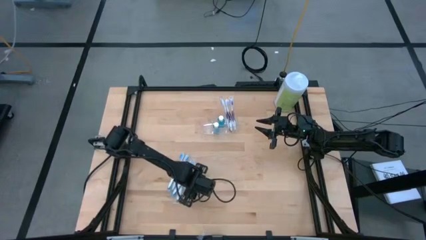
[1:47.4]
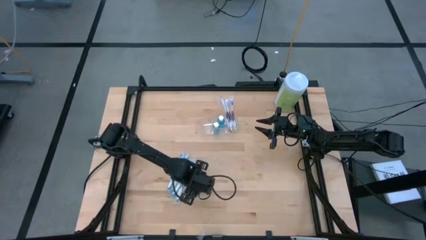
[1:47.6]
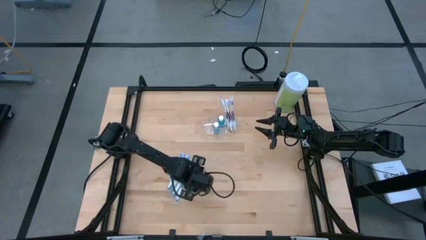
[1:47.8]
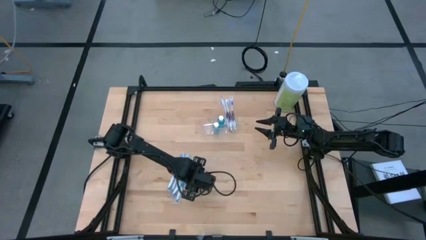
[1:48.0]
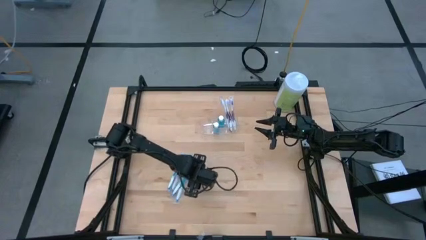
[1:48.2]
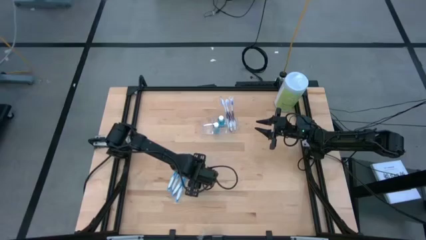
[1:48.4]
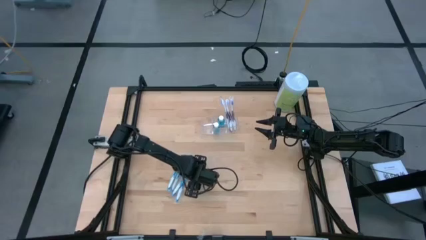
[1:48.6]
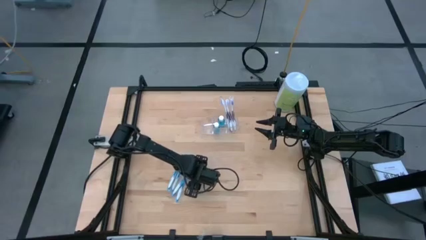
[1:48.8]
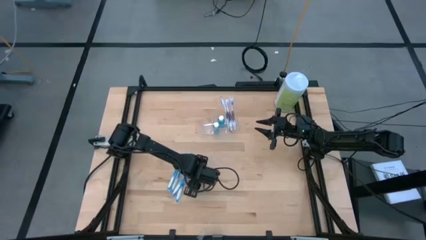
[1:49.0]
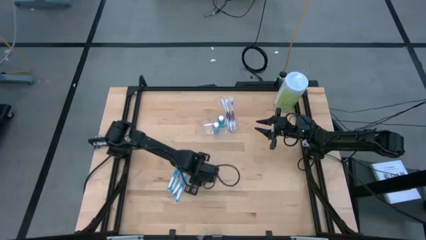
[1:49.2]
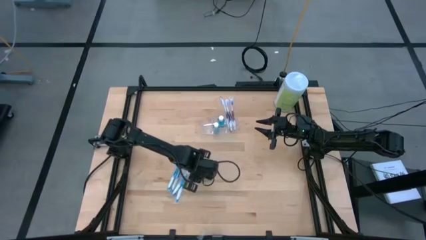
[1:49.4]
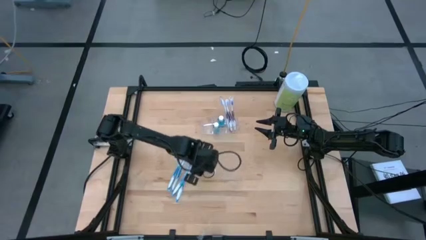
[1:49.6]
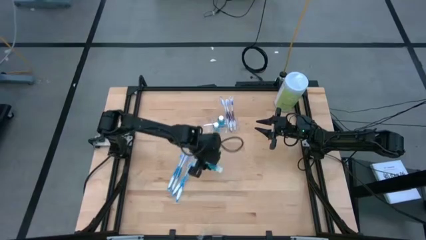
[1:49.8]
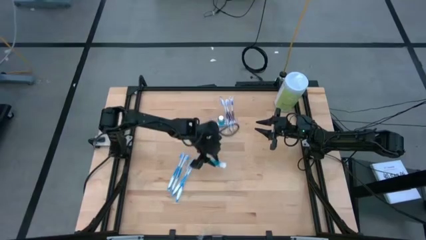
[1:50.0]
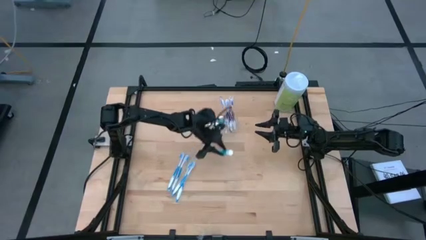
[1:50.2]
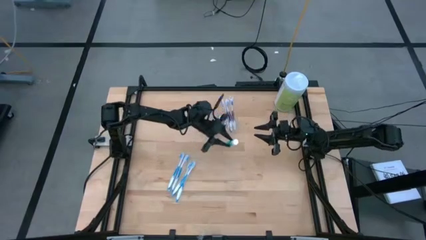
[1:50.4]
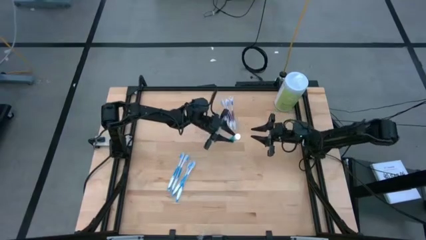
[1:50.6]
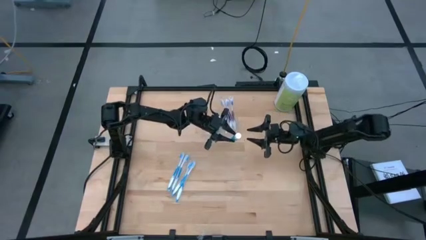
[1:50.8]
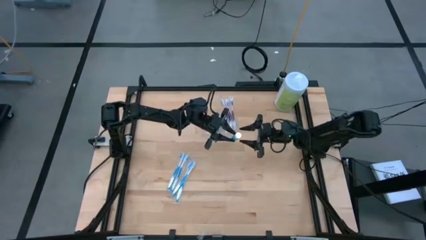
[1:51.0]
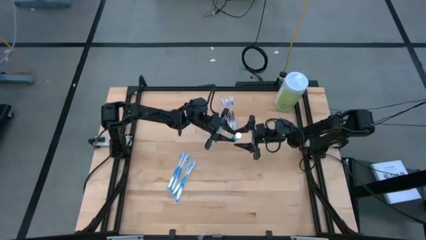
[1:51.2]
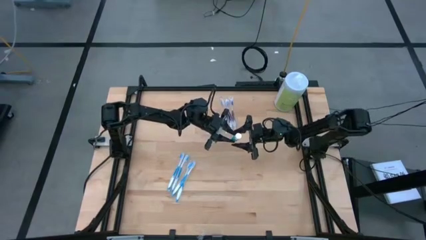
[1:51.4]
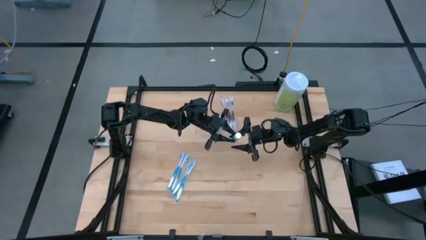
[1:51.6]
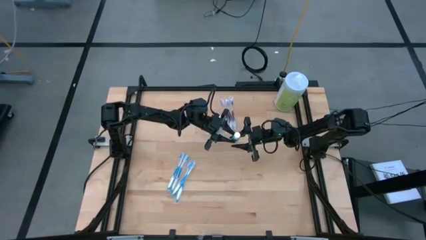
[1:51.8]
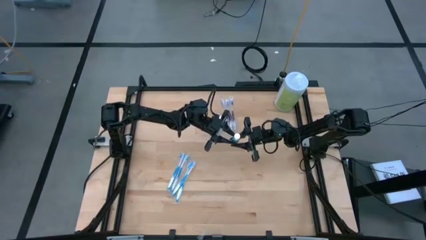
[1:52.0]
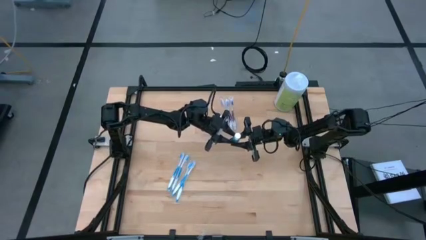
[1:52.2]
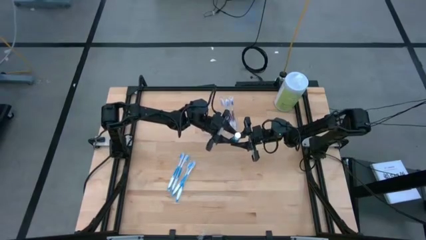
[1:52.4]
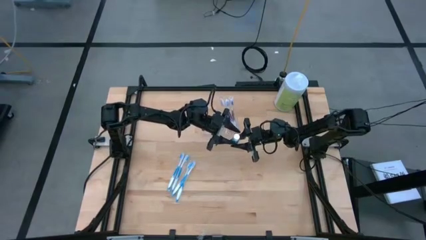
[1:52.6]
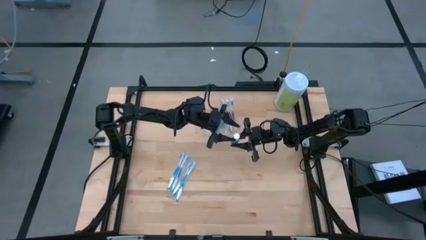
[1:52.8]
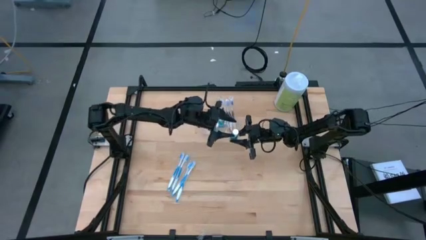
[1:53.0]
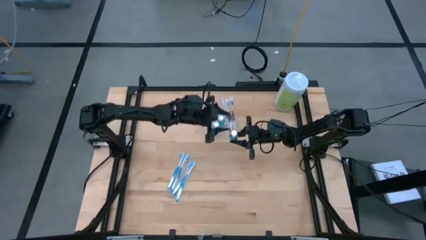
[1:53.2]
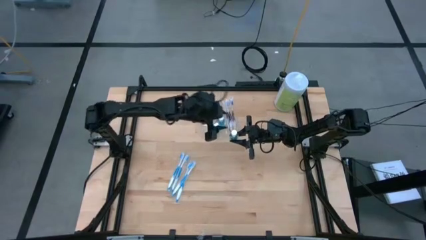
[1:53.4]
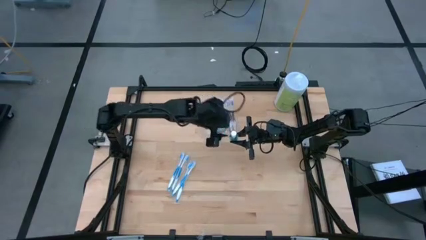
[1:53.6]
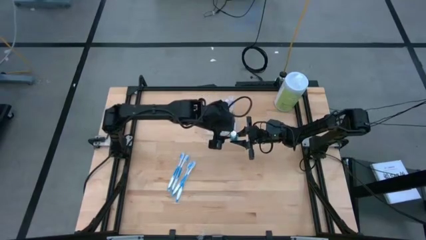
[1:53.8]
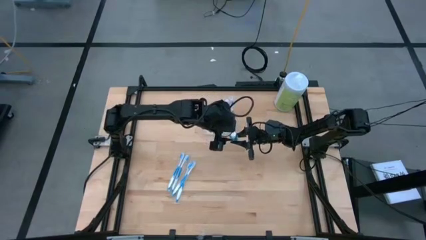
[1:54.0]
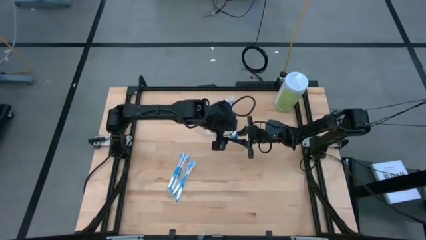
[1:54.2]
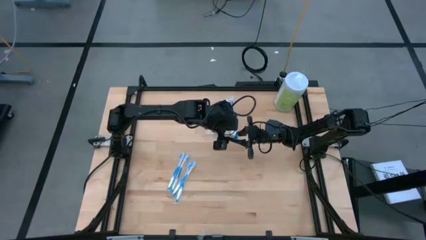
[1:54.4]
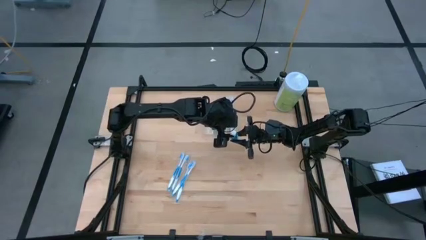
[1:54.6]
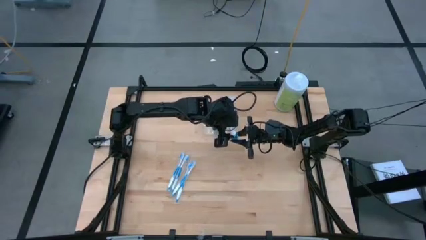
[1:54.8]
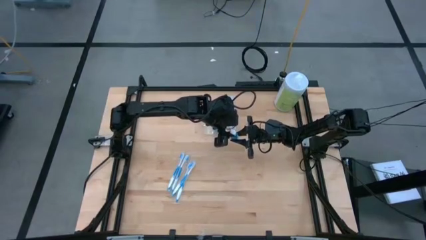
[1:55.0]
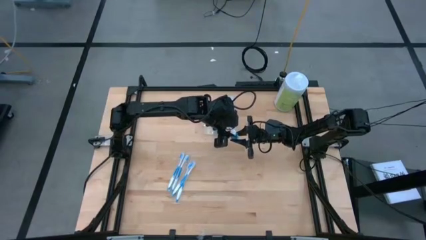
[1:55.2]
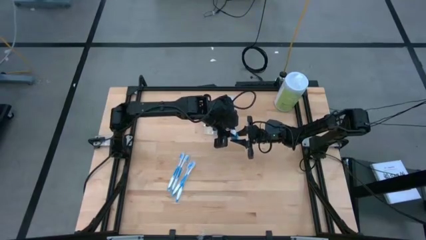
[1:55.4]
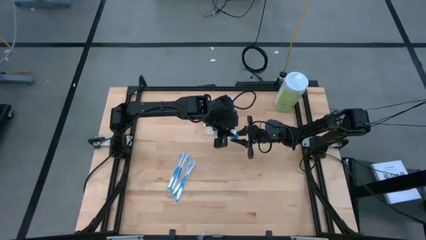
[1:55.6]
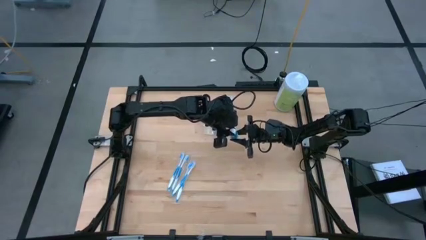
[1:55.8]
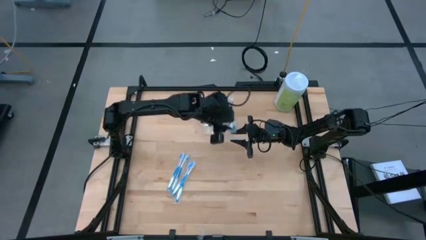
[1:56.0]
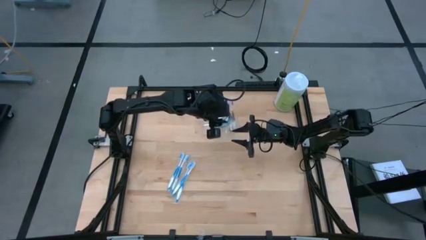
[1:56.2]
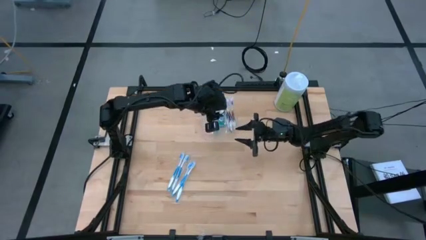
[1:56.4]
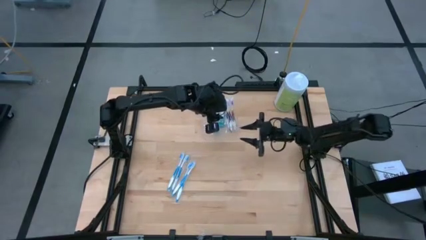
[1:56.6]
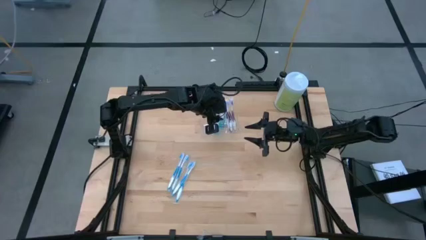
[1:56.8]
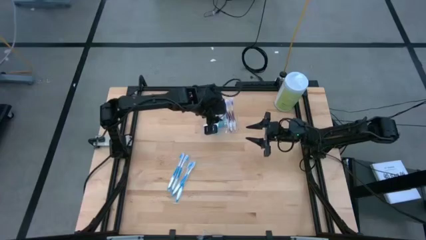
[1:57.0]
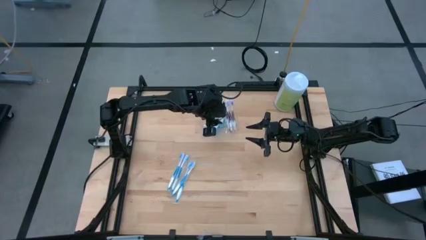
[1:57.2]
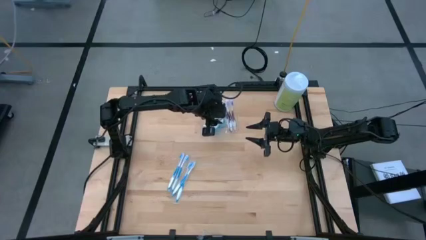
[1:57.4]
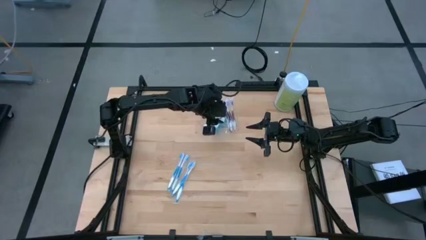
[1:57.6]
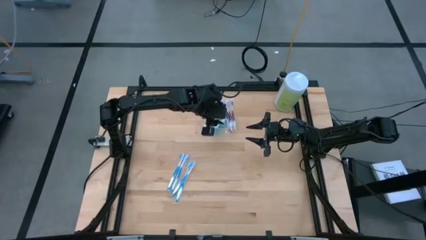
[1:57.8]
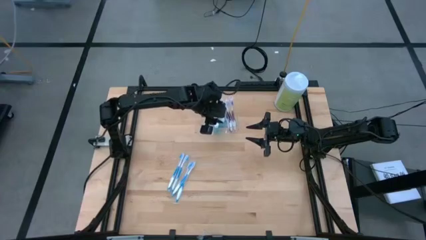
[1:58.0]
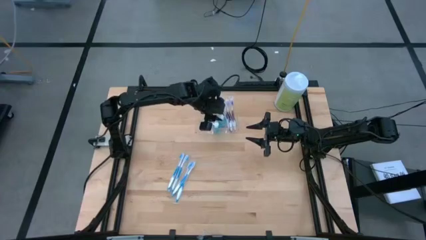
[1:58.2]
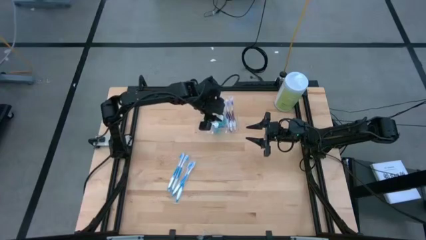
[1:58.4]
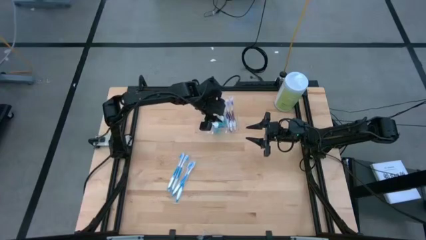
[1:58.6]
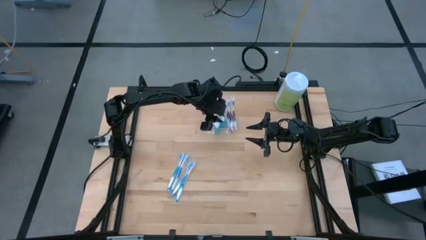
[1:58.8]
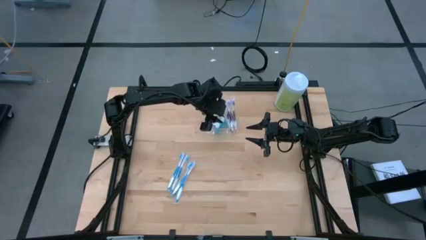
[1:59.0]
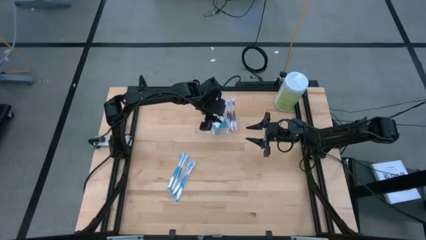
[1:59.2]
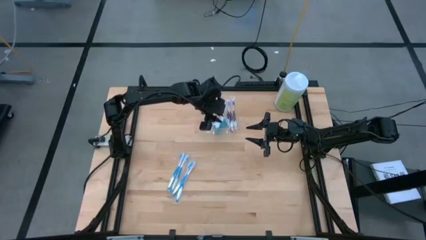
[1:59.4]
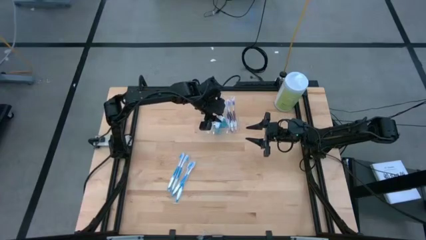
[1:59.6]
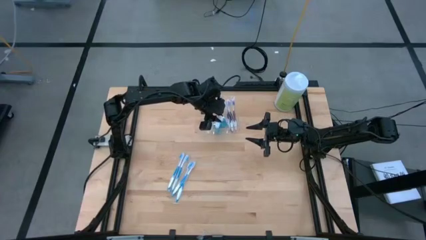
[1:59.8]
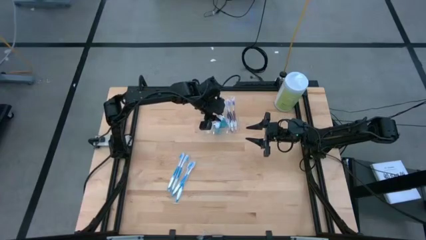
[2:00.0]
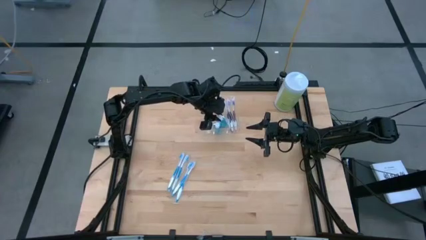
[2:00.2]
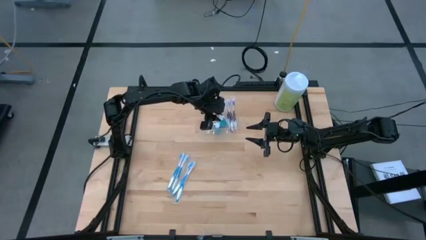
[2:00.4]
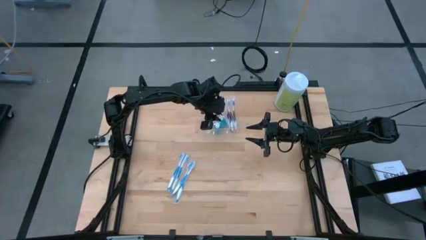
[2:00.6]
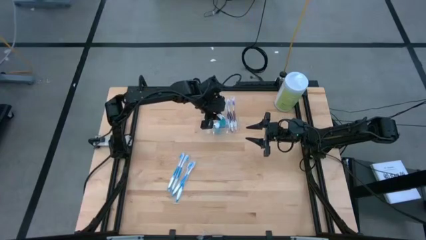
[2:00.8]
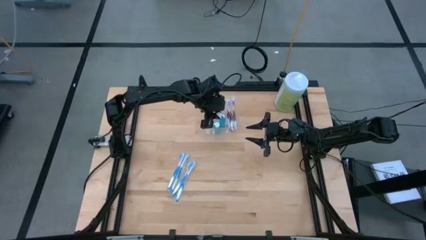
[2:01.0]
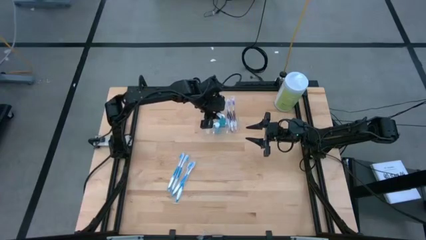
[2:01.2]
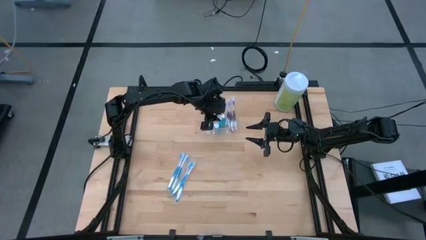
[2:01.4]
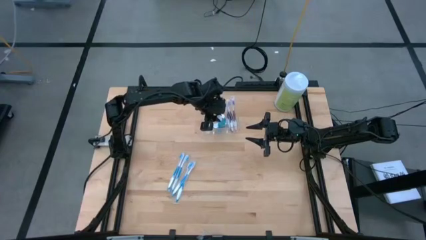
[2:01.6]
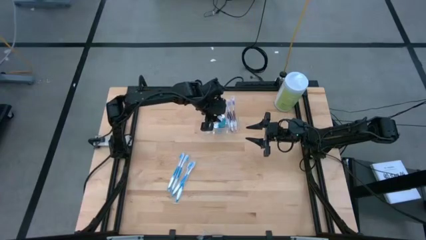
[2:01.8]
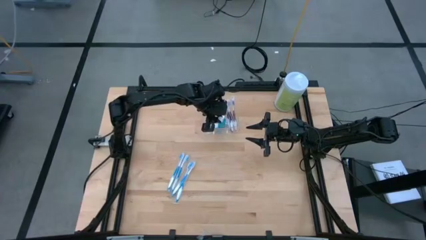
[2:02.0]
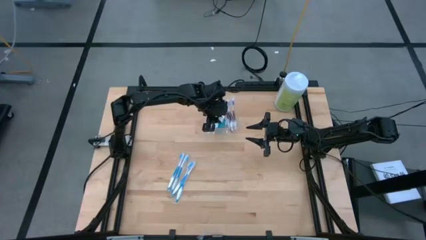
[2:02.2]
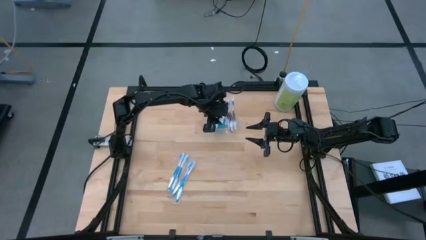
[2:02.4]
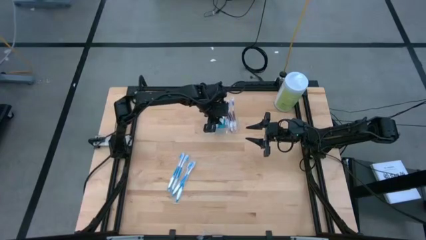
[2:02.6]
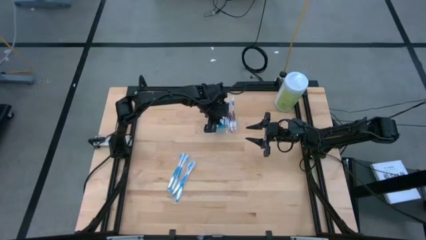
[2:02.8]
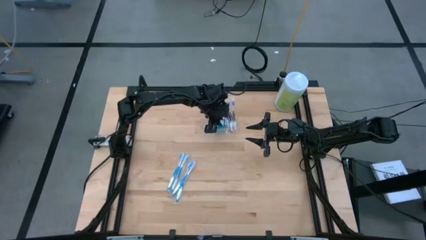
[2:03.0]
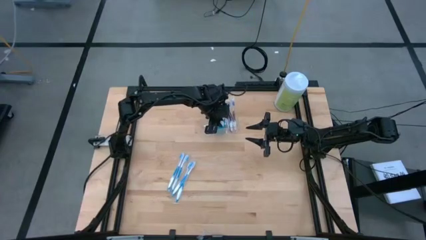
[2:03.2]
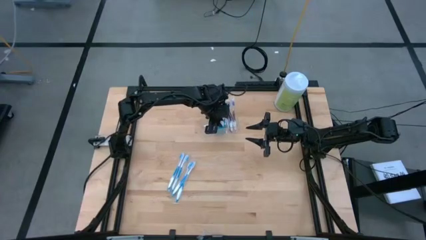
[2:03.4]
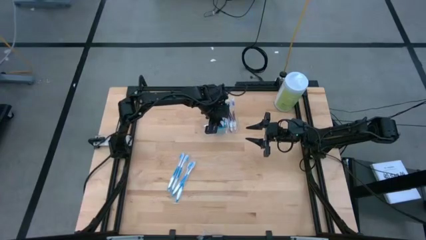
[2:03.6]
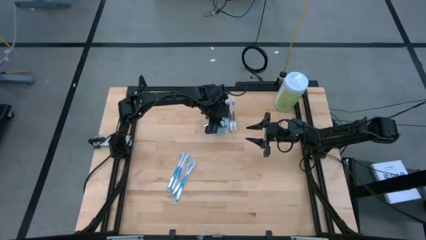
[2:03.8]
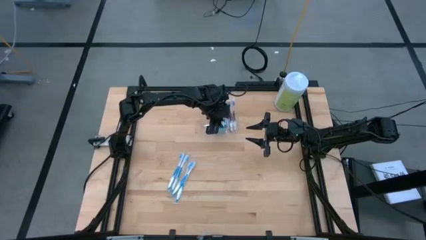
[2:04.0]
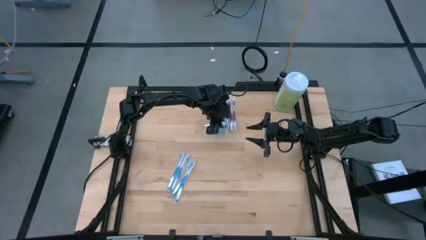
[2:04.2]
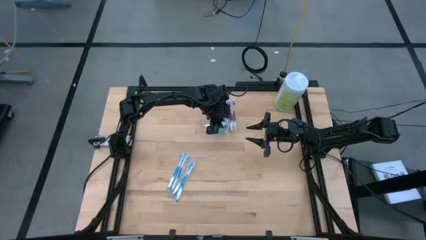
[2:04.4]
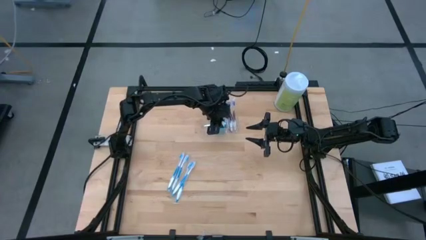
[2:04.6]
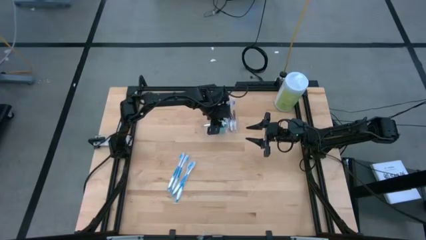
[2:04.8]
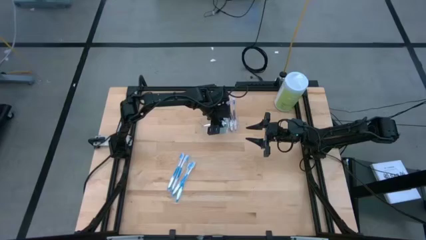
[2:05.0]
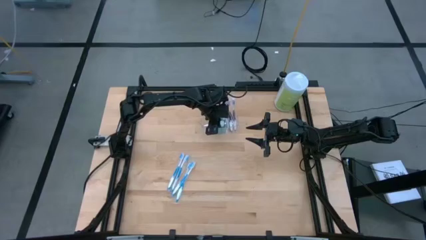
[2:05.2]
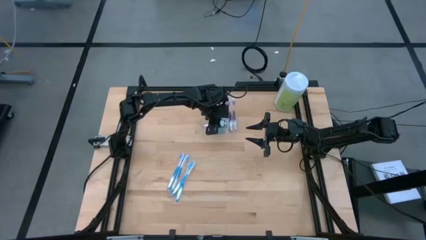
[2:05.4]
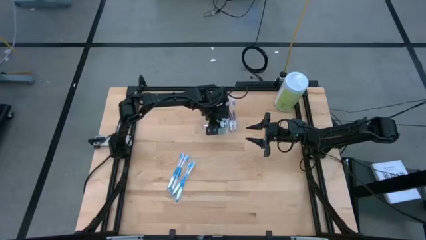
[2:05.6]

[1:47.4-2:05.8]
Task: Pick & Place toothbrushing station
Put the blue mouthwash into the transparent organizer
